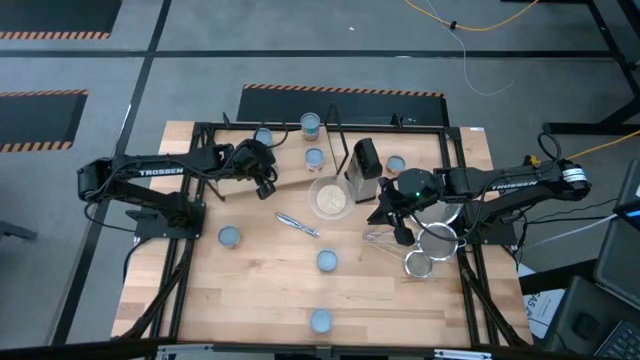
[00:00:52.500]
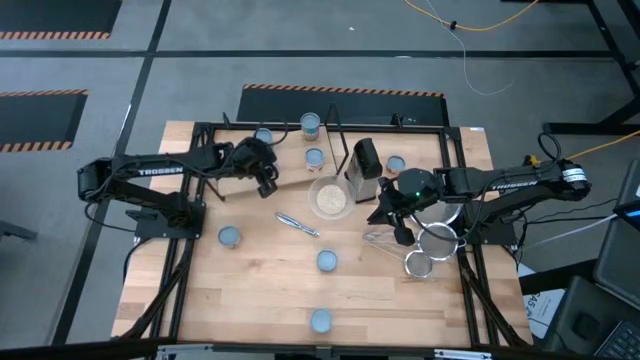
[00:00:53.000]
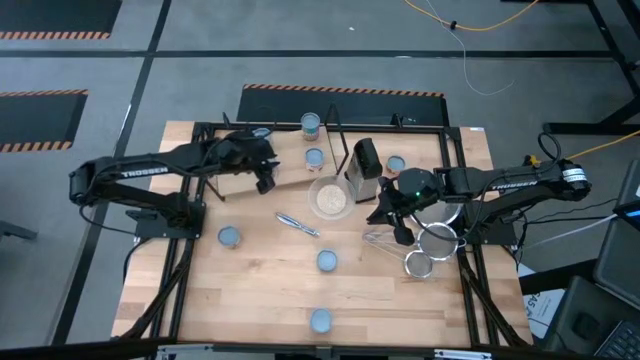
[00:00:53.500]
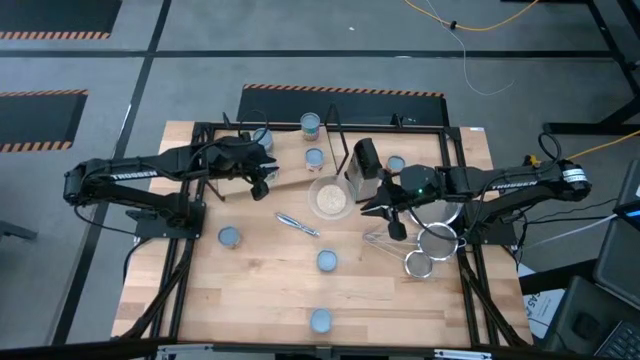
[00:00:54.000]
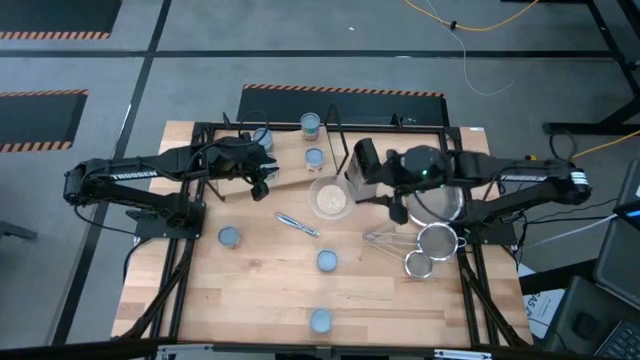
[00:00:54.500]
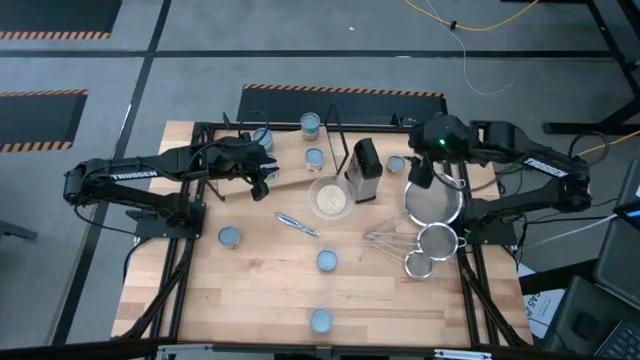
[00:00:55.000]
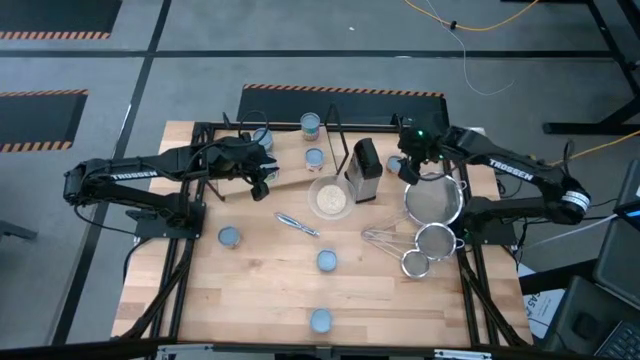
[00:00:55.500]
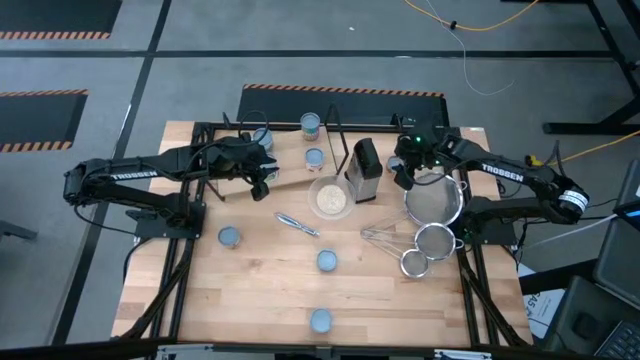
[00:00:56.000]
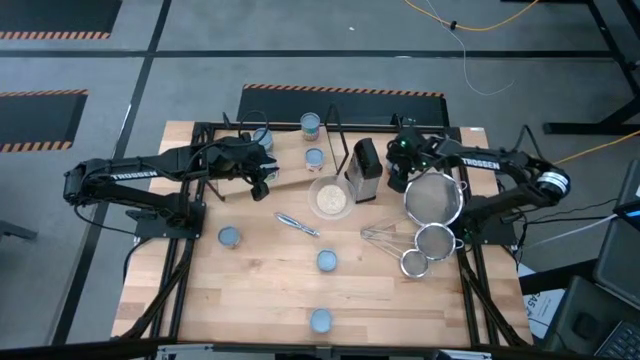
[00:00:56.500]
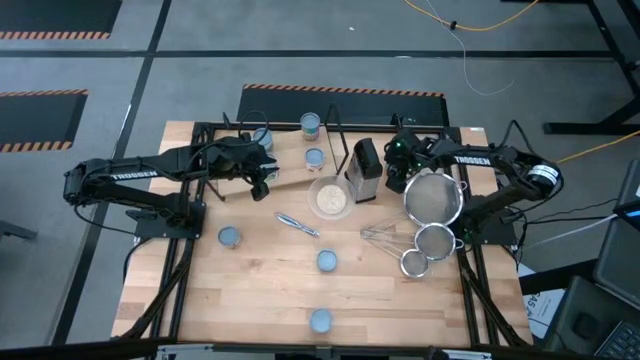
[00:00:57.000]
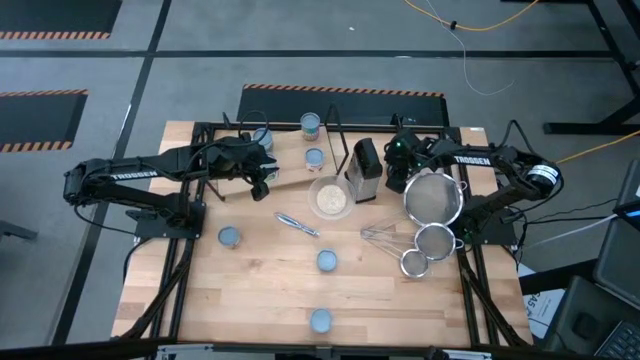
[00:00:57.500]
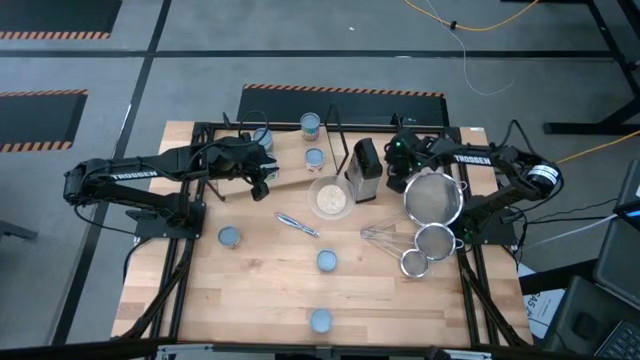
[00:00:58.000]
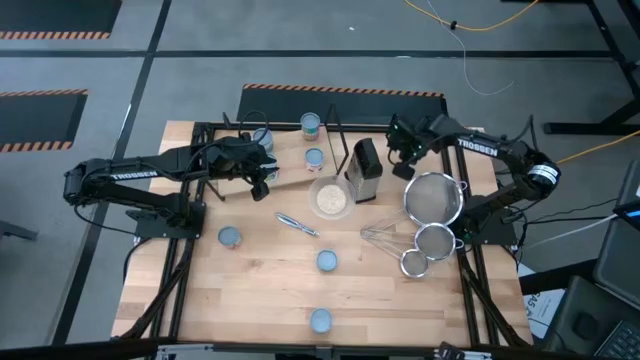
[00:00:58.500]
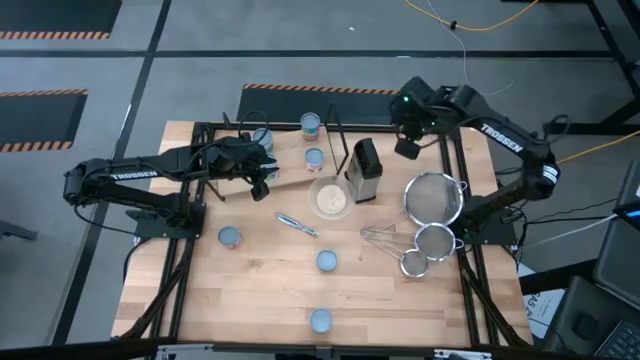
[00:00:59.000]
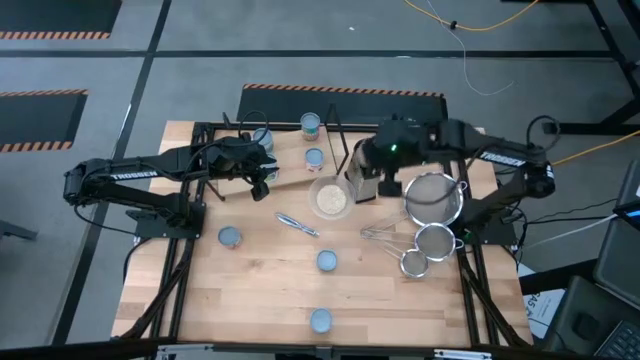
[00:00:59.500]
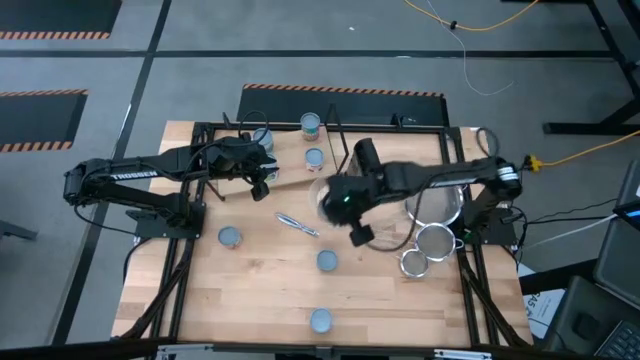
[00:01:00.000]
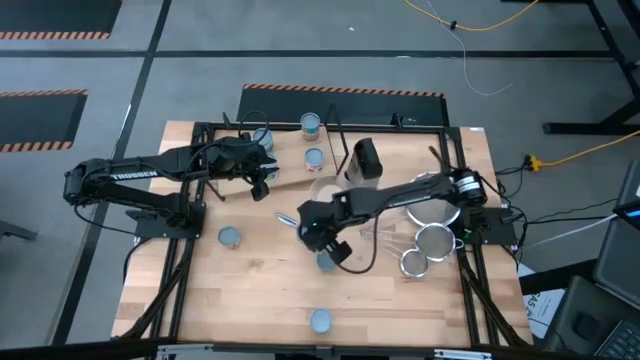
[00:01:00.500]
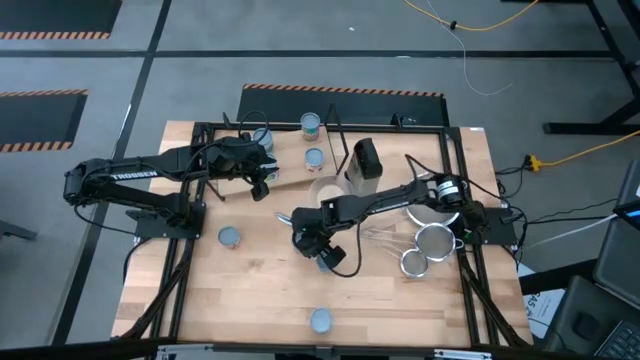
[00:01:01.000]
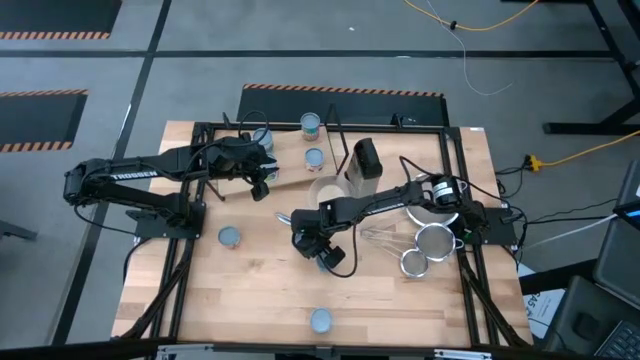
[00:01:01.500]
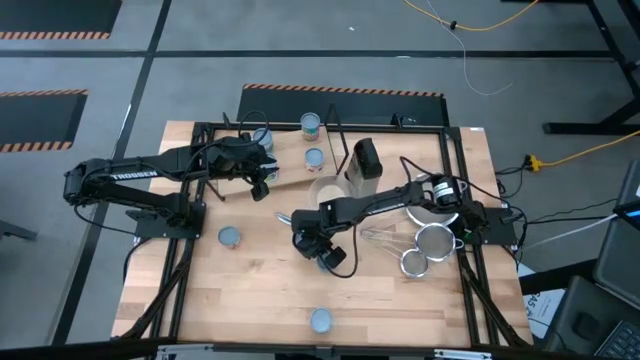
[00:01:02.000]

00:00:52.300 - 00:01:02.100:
Task: Pick and place cans onto a shelf
Move the yellow can to the center of the table

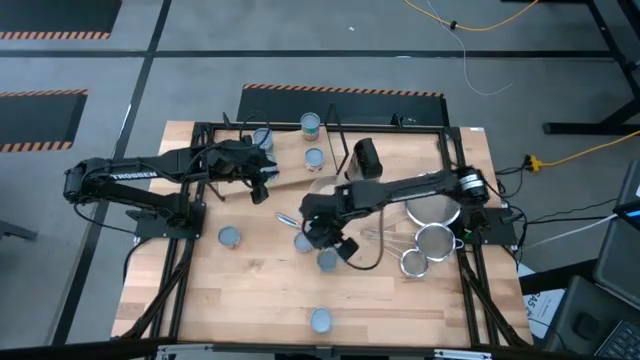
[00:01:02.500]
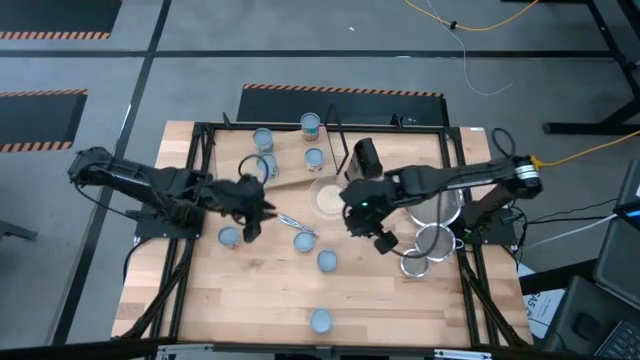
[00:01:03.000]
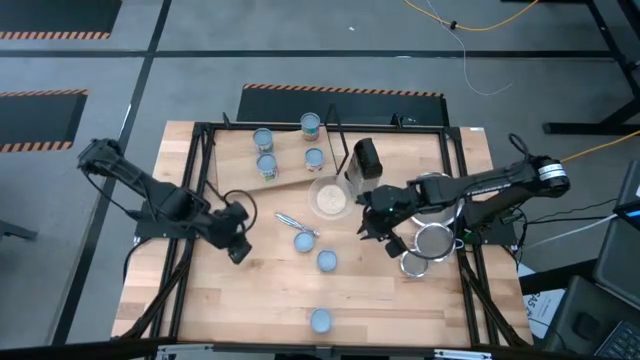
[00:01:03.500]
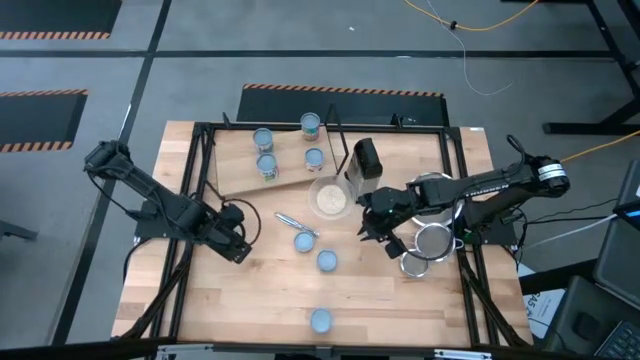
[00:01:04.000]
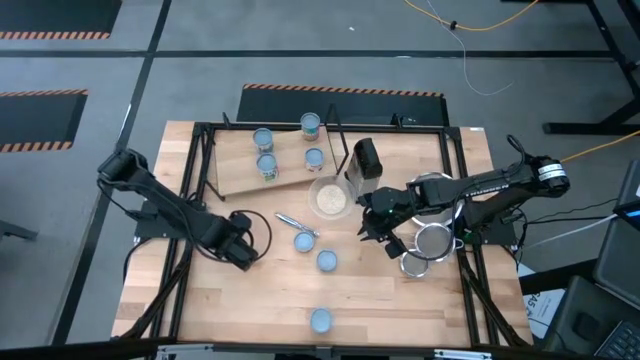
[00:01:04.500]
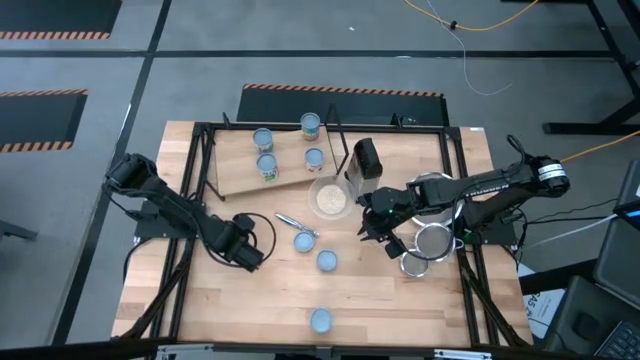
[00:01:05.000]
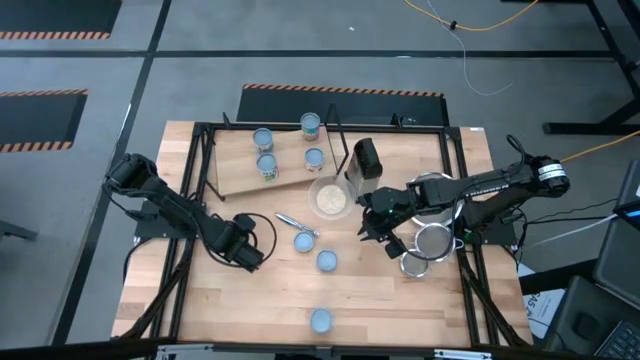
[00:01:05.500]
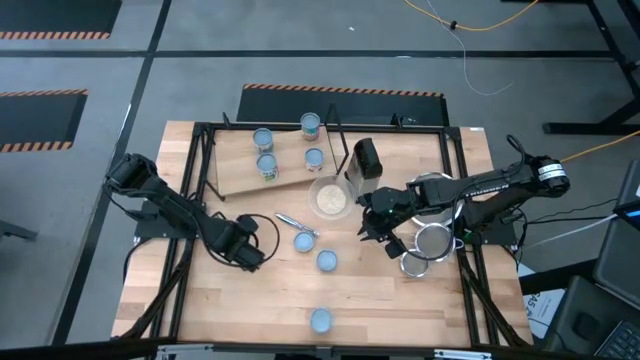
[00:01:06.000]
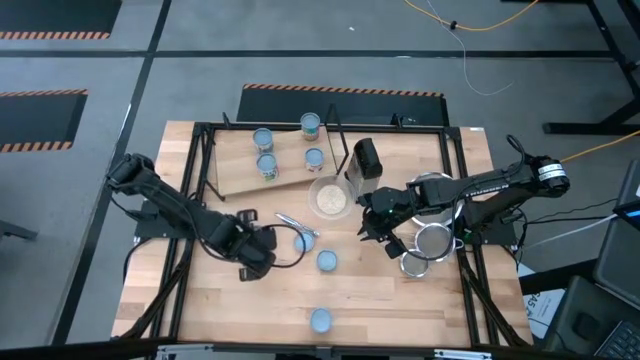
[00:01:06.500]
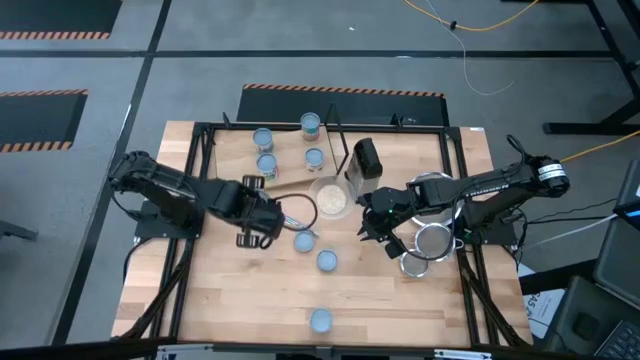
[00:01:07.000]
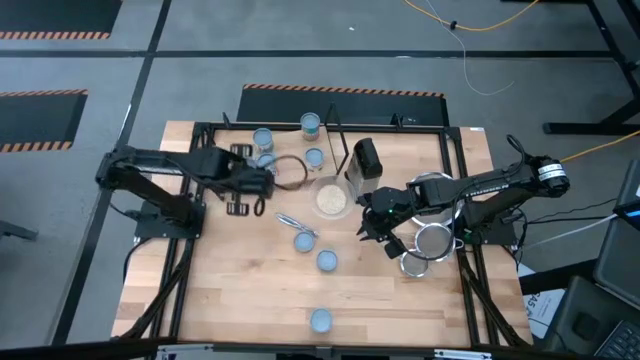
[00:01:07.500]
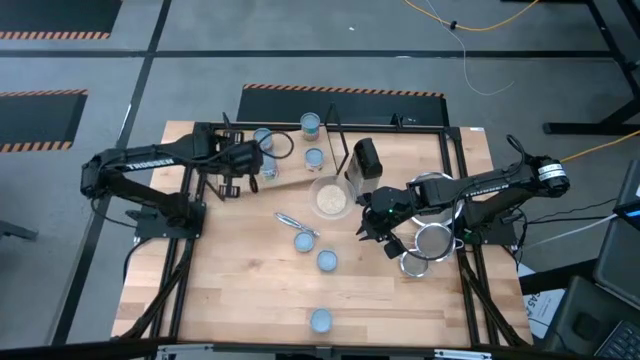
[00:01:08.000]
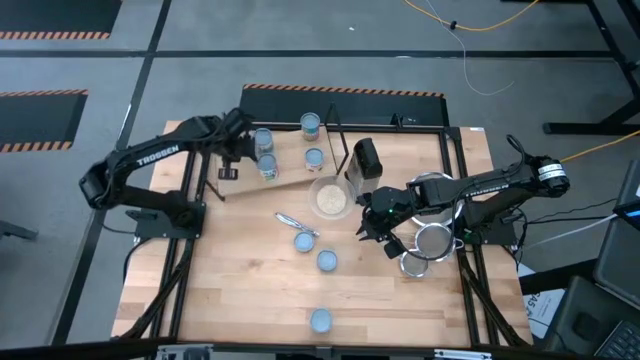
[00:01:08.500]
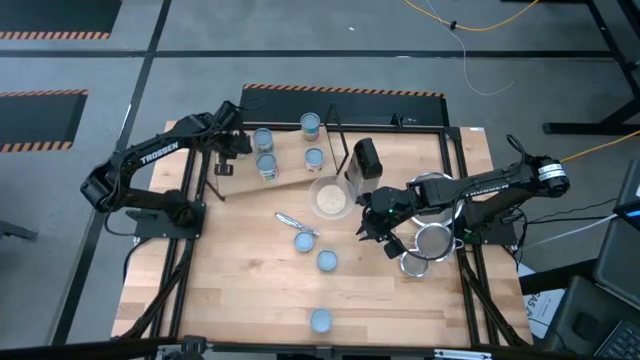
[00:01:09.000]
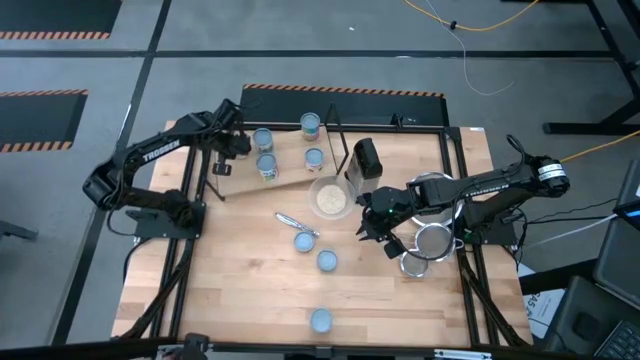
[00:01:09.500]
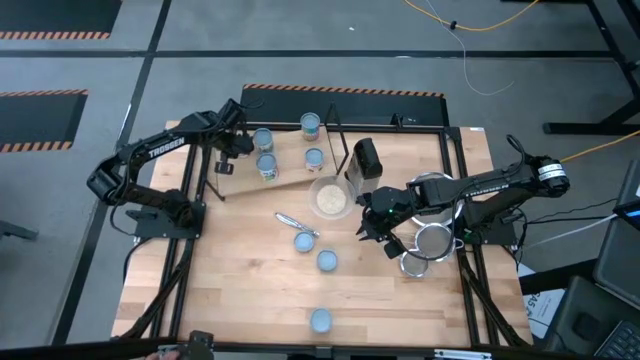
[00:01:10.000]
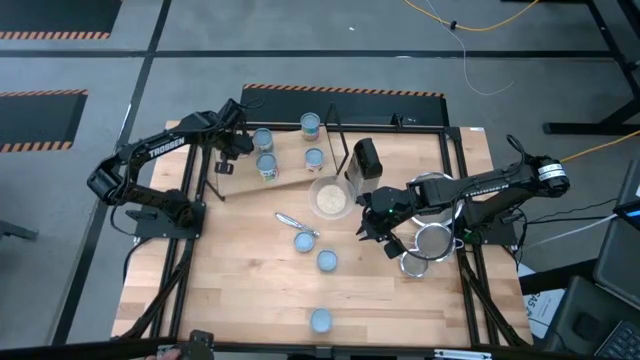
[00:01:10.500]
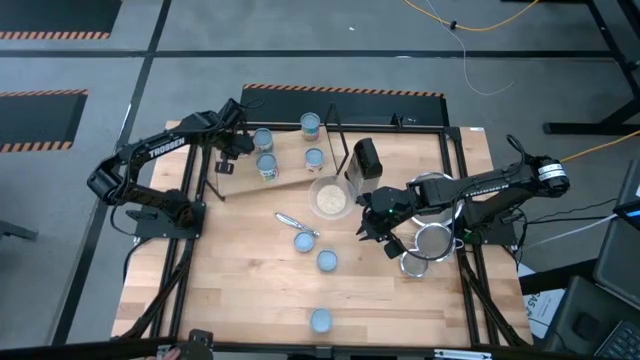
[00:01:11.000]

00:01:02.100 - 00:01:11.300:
Put the light green can on the shelf
